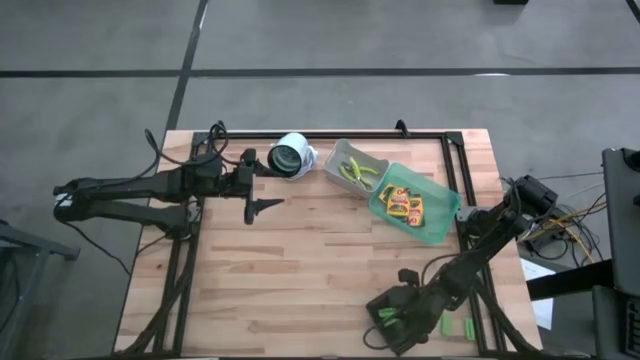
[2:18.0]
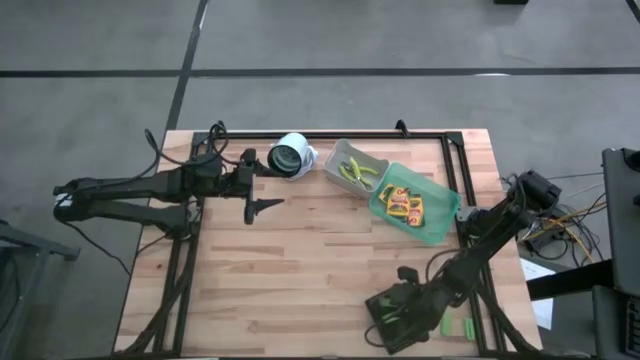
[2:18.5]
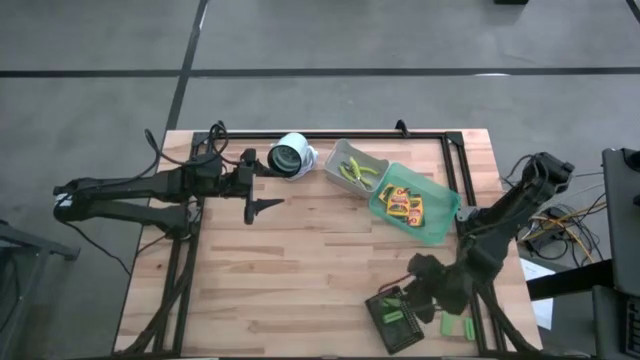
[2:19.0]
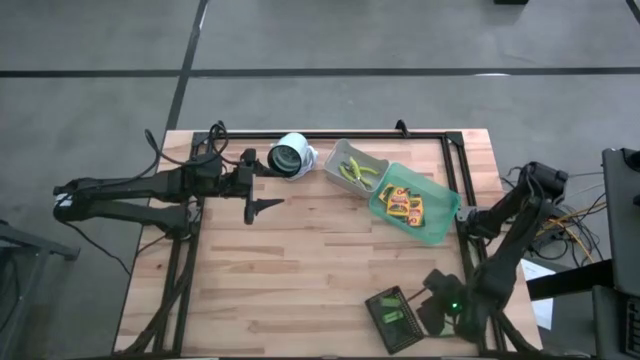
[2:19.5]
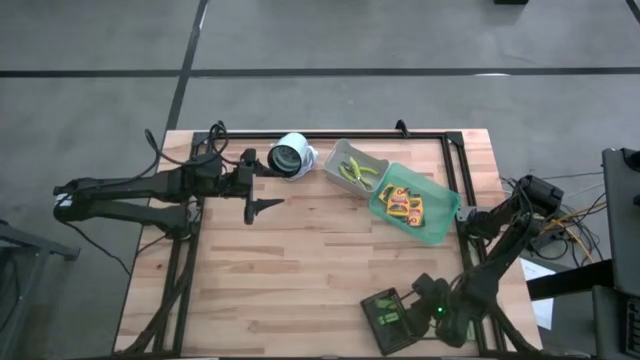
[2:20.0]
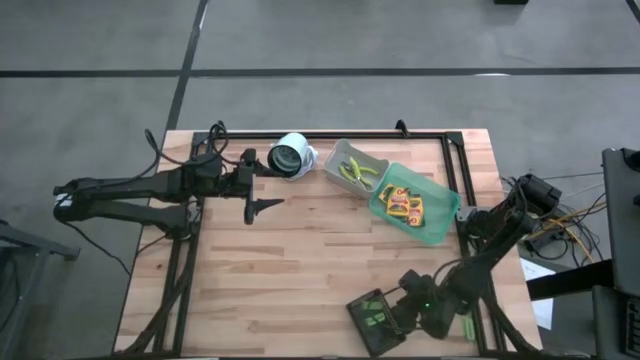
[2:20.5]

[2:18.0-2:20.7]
Task: Pick & Place School Supplies
Put the green eraser into the black bin

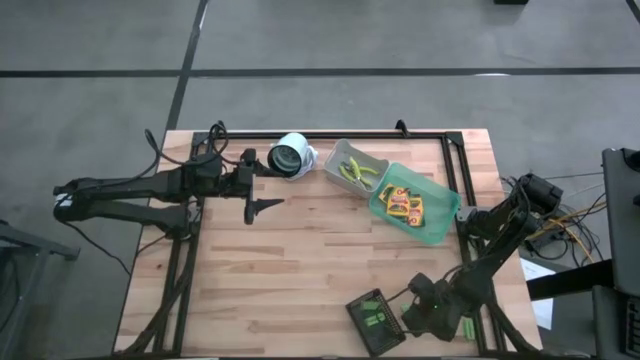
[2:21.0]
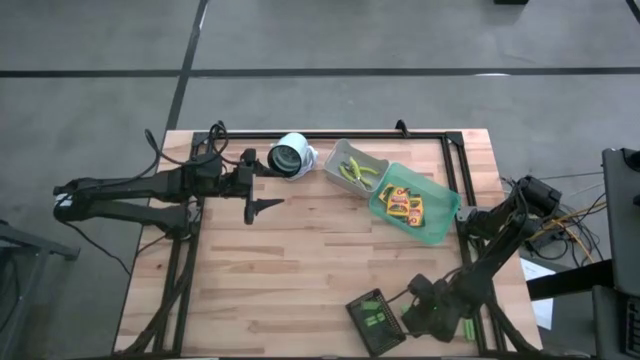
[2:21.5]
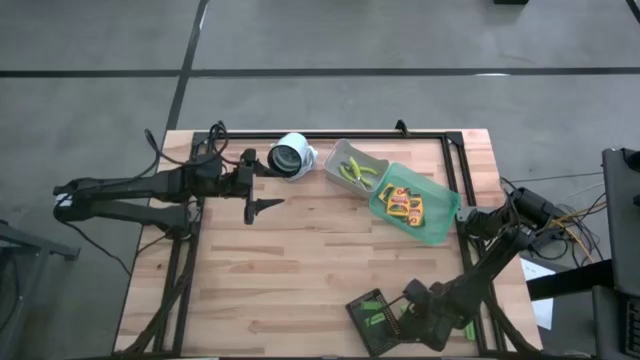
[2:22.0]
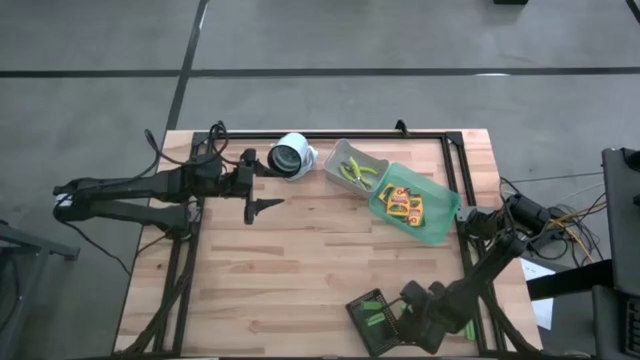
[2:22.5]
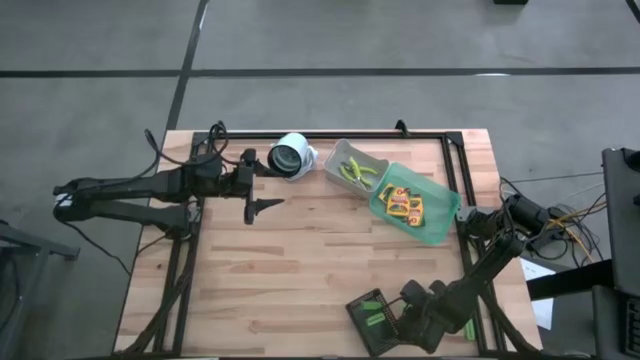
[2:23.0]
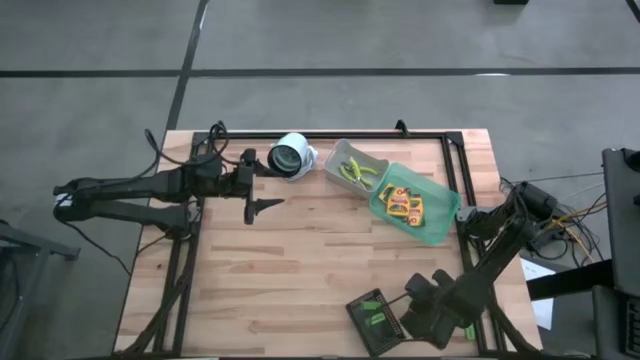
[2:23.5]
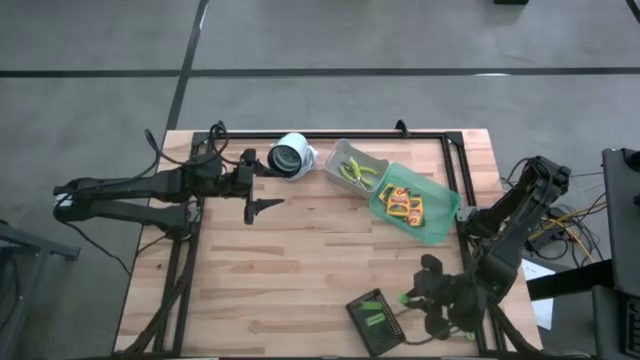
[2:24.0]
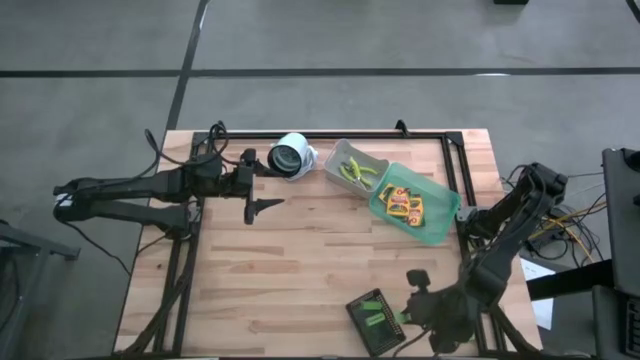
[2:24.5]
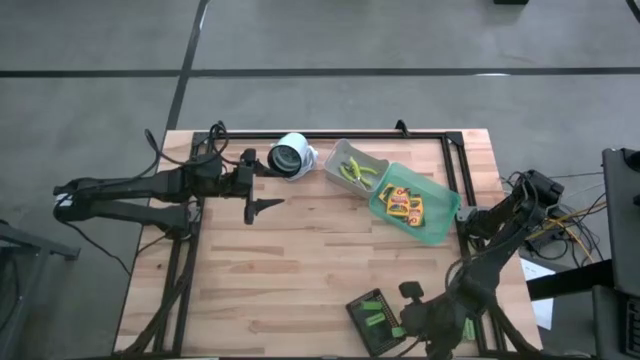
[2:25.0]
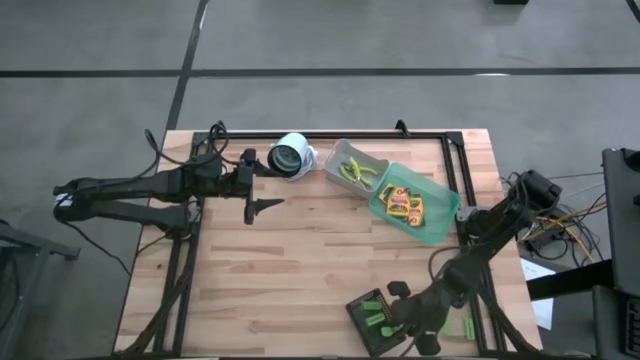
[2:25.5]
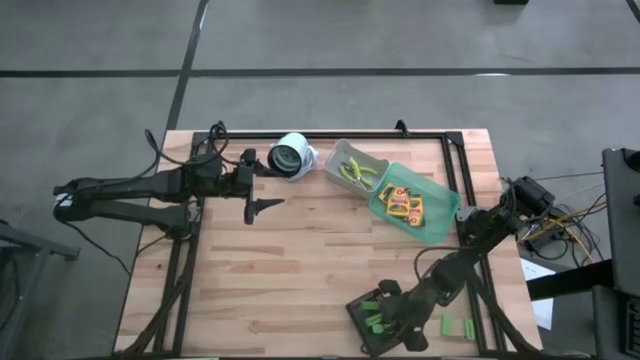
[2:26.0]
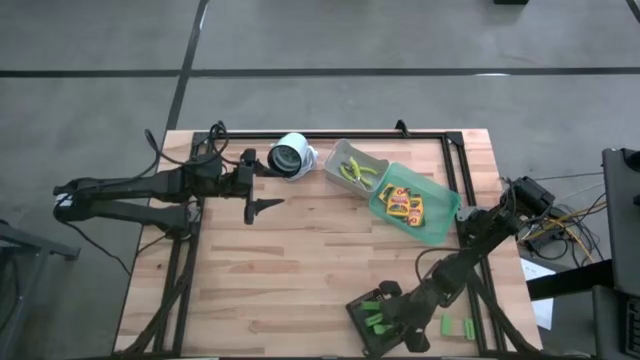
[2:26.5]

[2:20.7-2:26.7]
Adjust the black bin

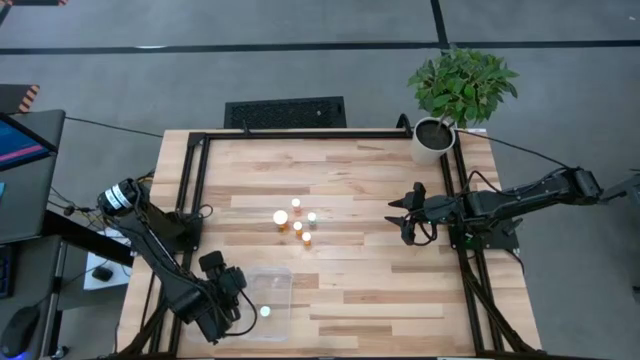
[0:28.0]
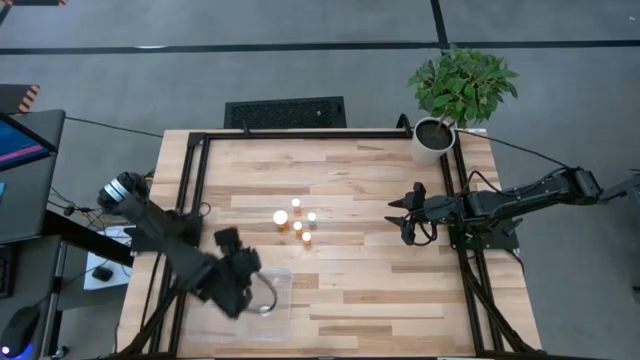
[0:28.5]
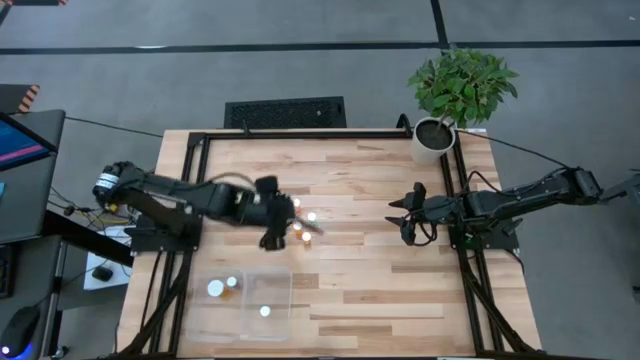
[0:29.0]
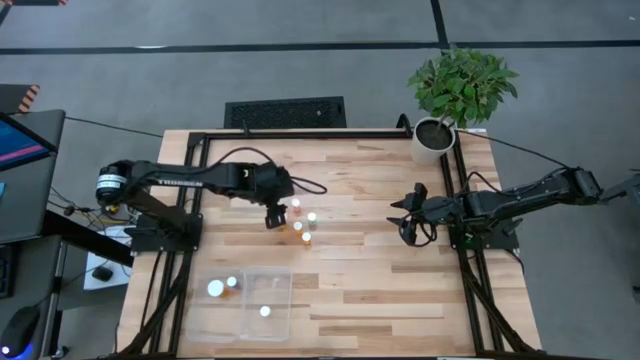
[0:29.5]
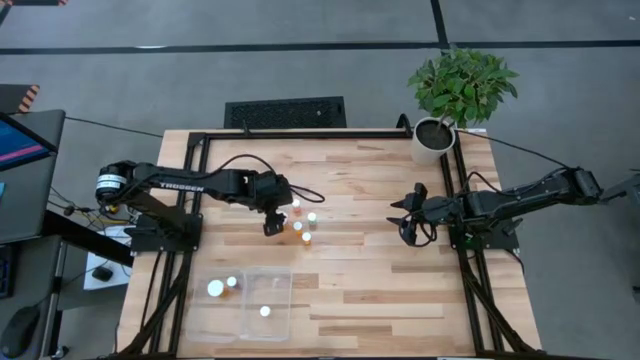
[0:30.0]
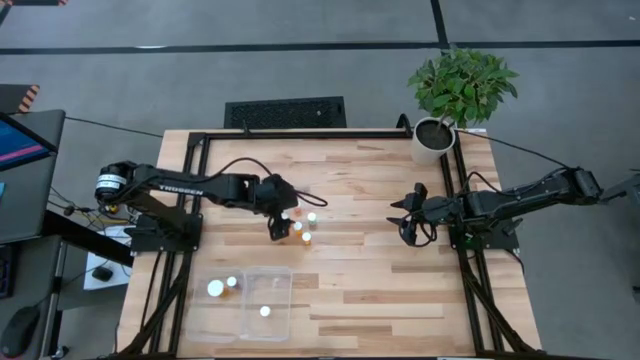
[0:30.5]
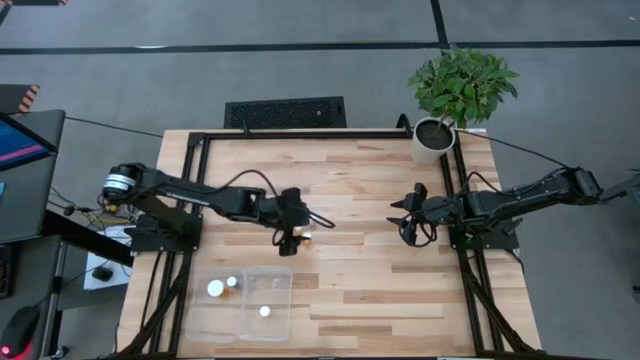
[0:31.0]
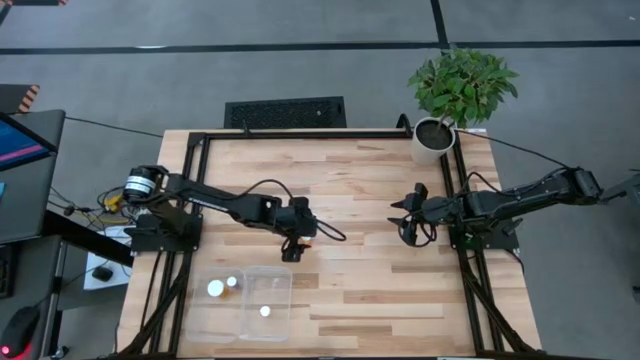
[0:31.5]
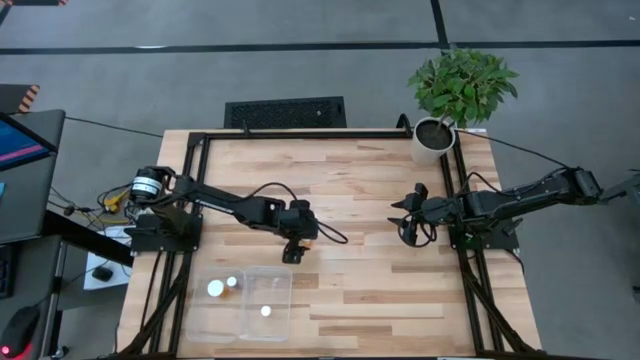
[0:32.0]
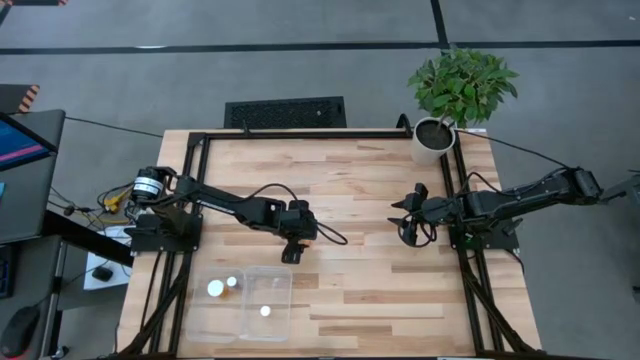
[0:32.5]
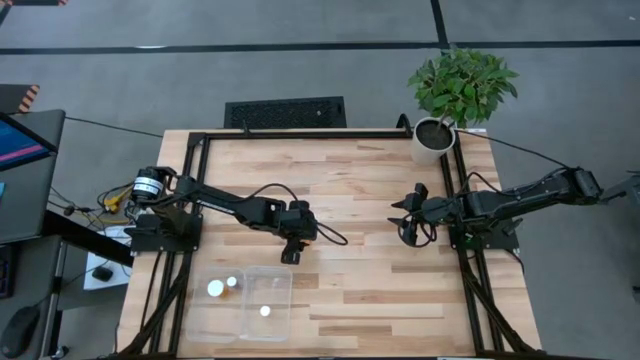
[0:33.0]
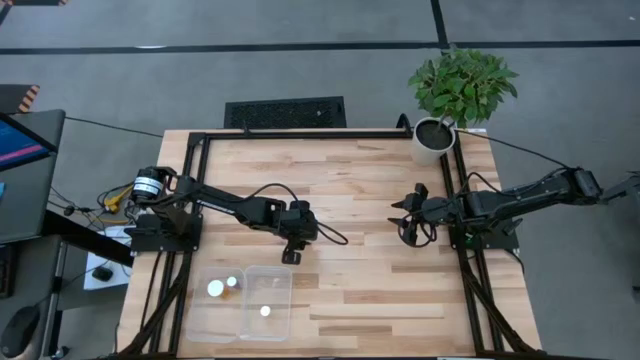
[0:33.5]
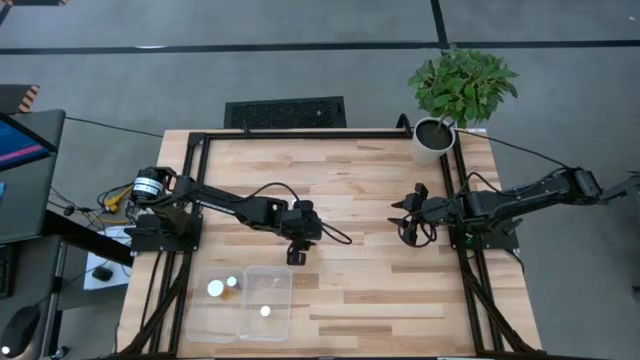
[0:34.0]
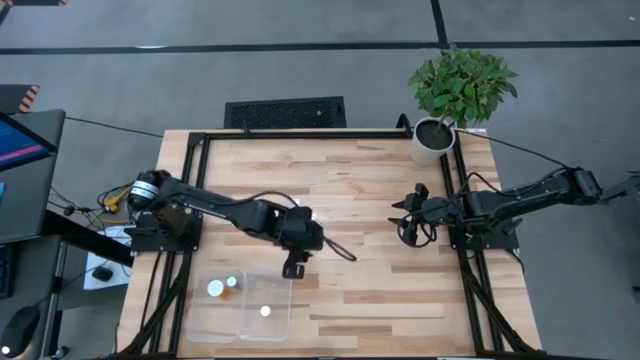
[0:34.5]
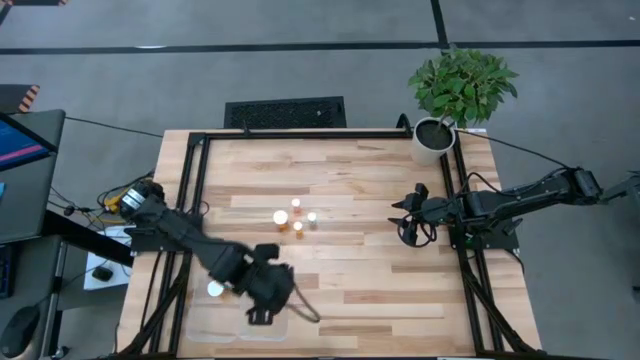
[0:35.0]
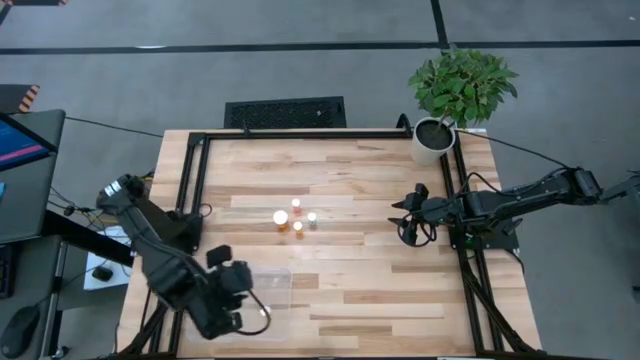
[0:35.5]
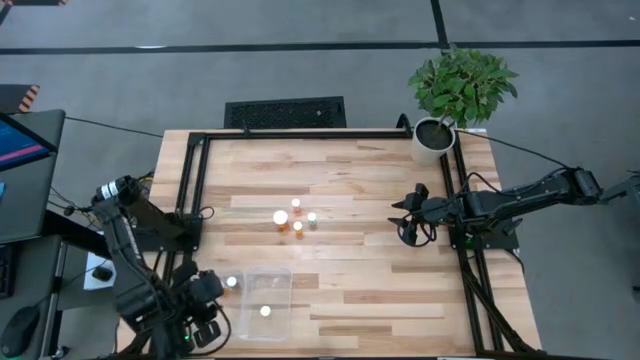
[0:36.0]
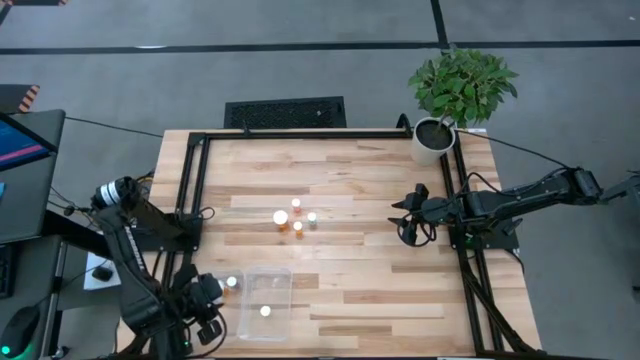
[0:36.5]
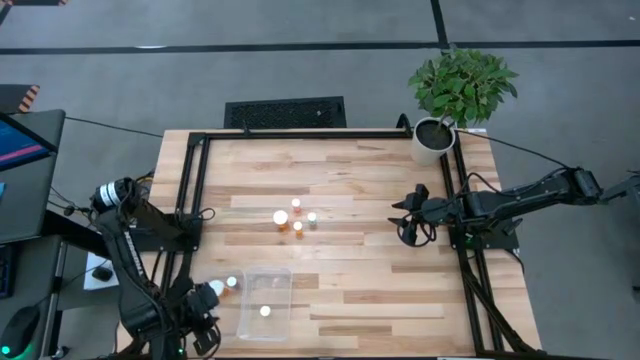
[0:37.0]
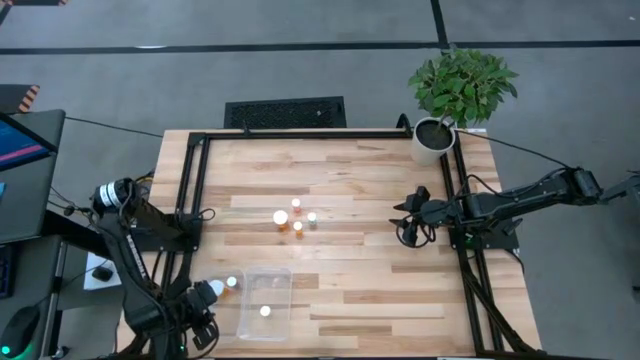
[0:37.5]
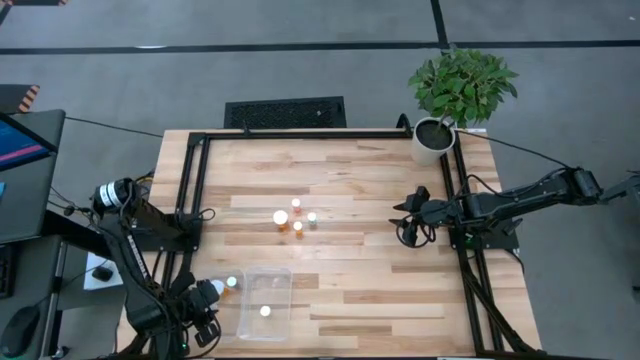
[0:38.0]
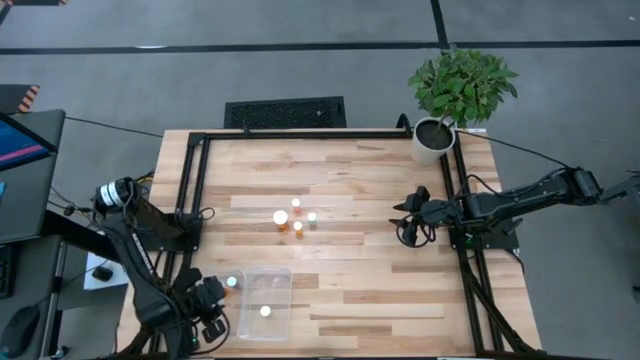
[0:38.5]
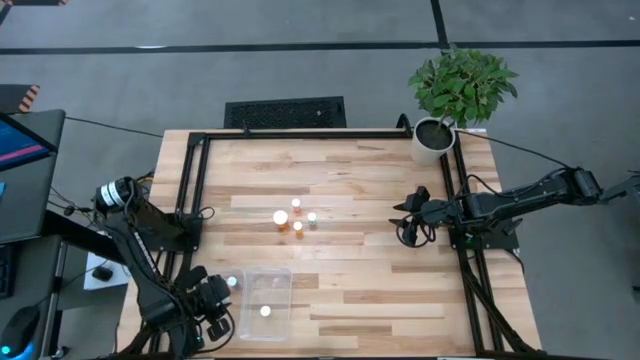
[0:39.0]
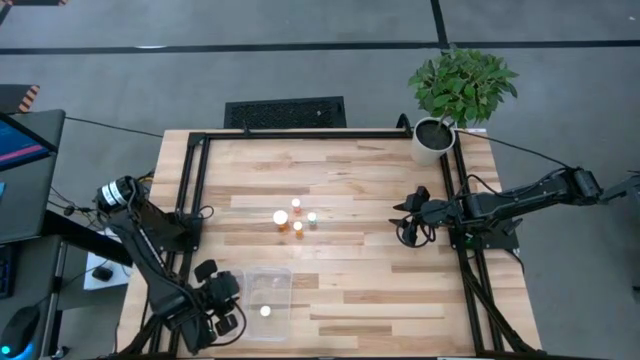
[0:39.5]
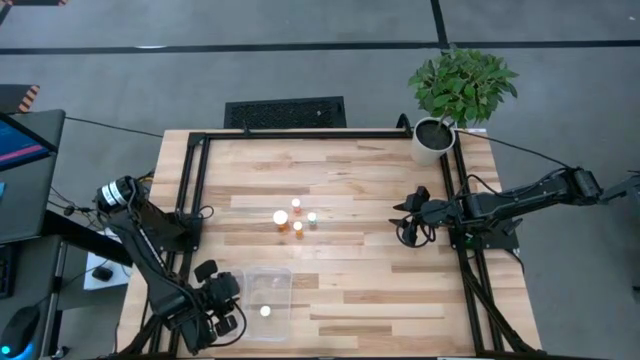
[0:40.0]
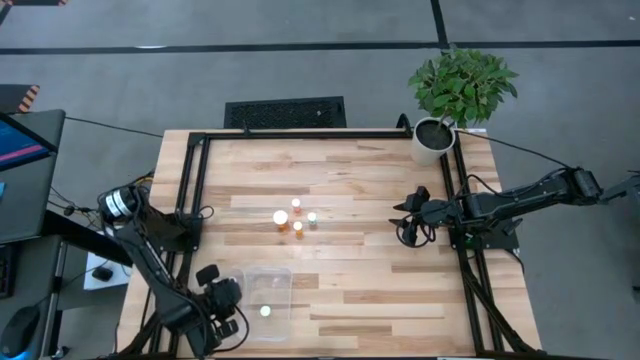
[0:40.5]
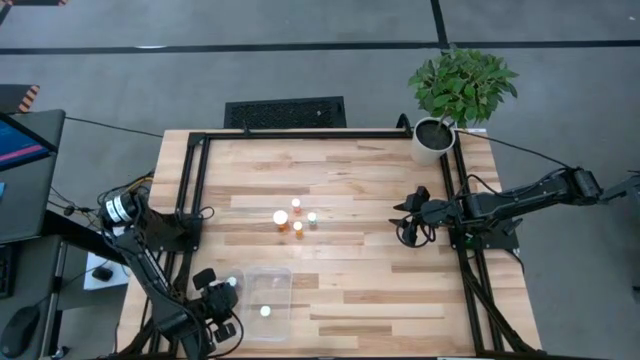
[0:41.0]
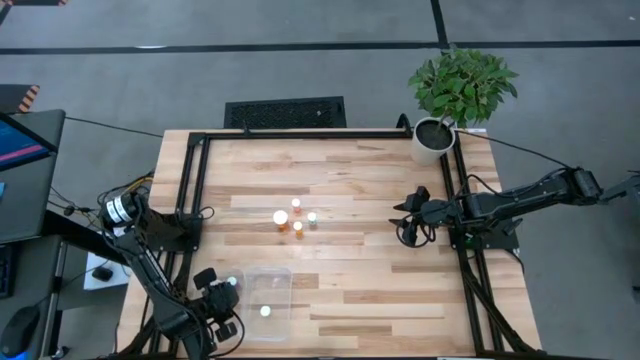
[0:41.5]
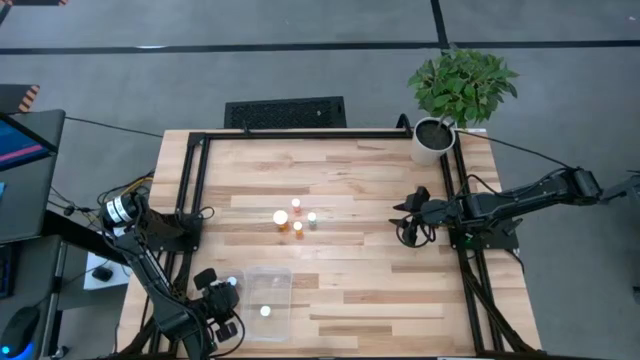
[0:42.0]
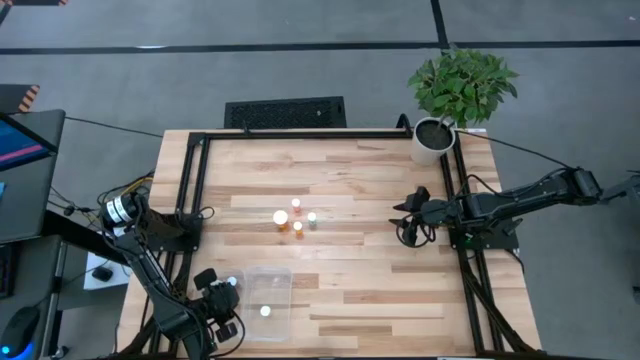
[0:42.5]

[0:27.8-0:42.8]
Task: Pick and place medicine bottles into bin by pill shape (circle, oval)
Put the bottom small orange pill bottle into the left transparent bin
